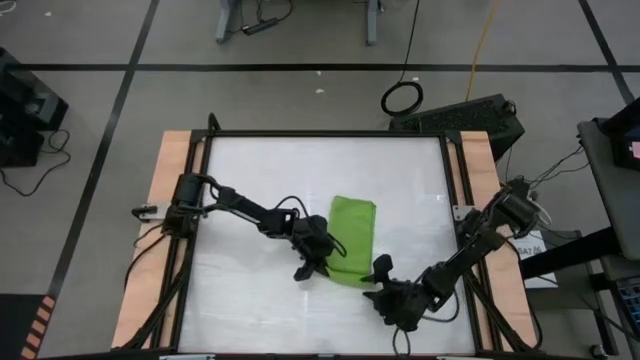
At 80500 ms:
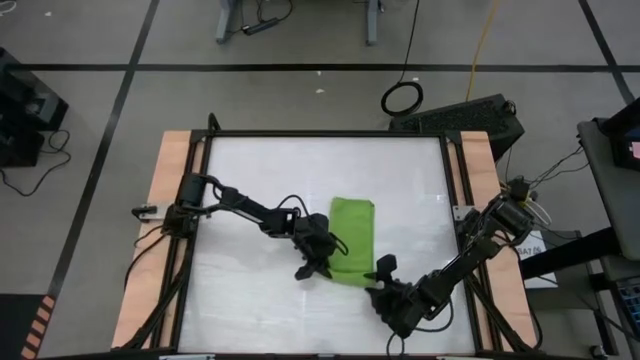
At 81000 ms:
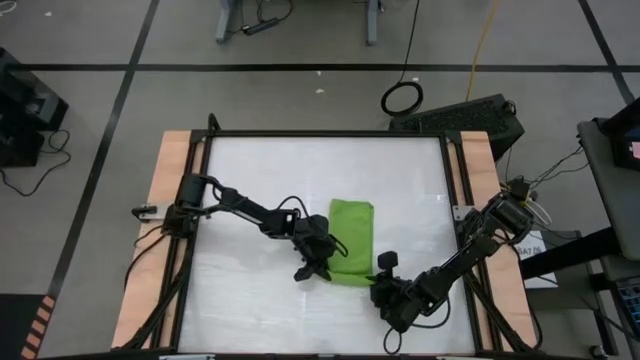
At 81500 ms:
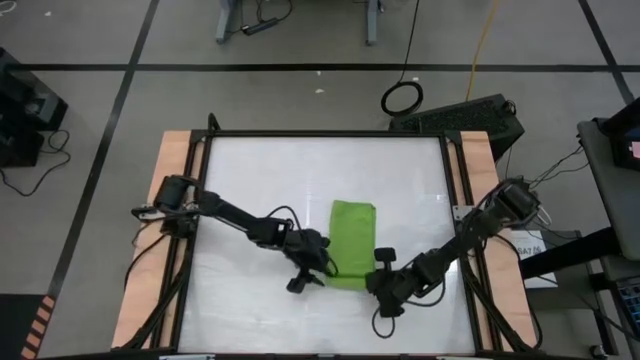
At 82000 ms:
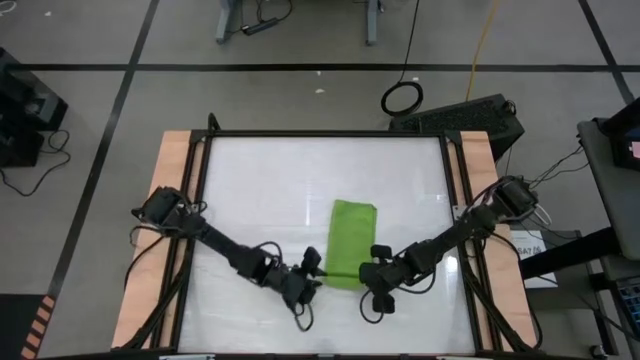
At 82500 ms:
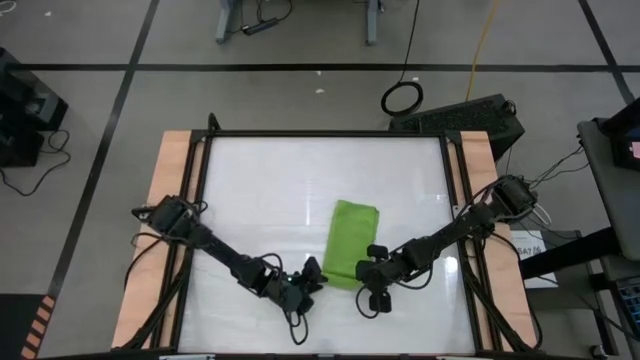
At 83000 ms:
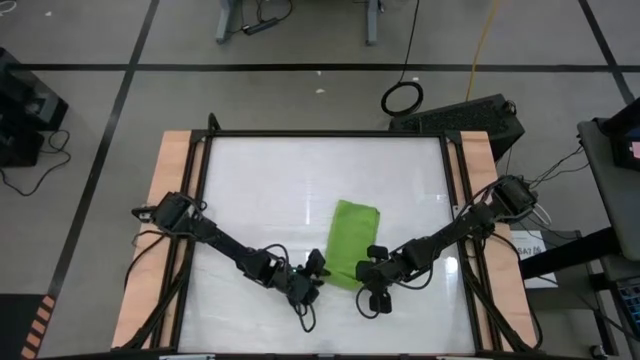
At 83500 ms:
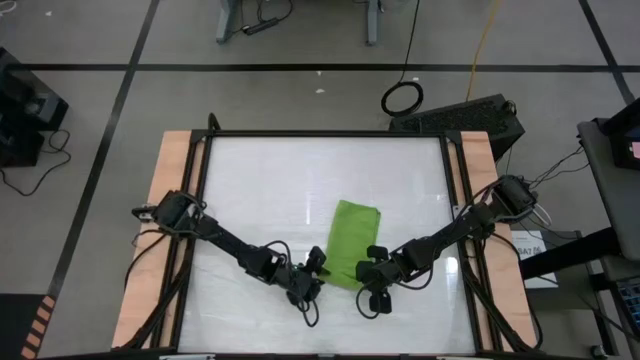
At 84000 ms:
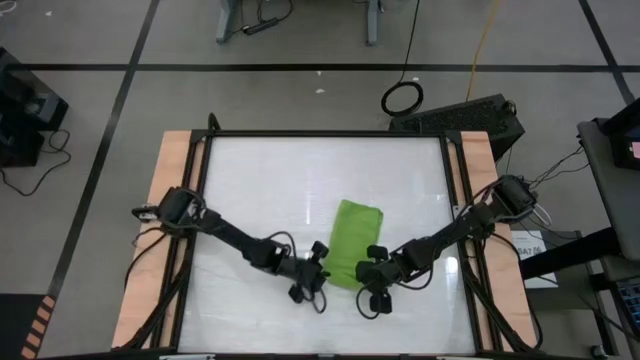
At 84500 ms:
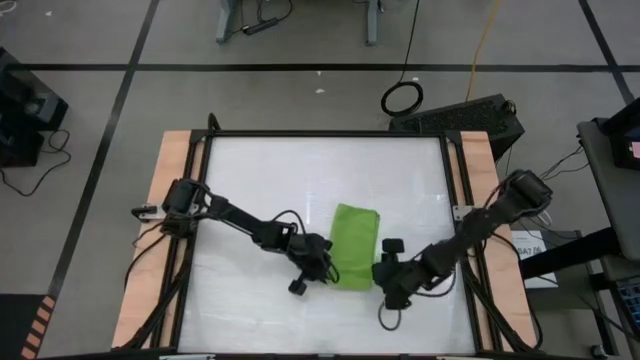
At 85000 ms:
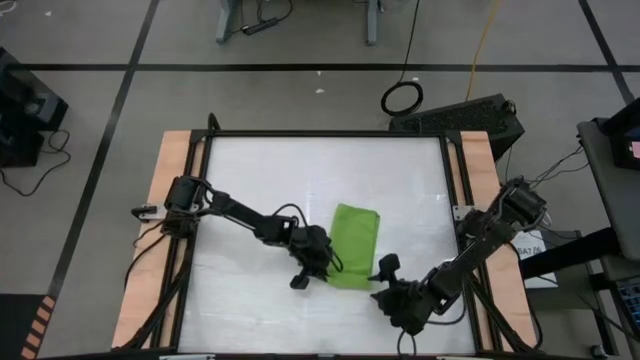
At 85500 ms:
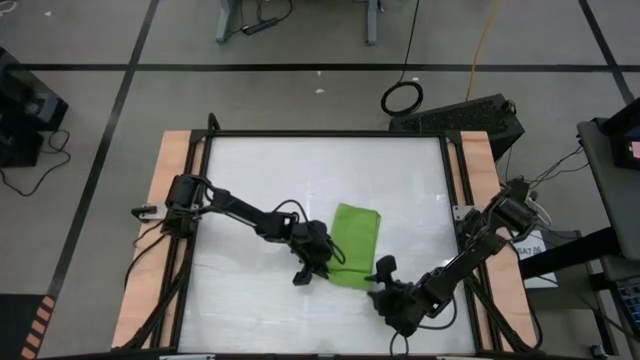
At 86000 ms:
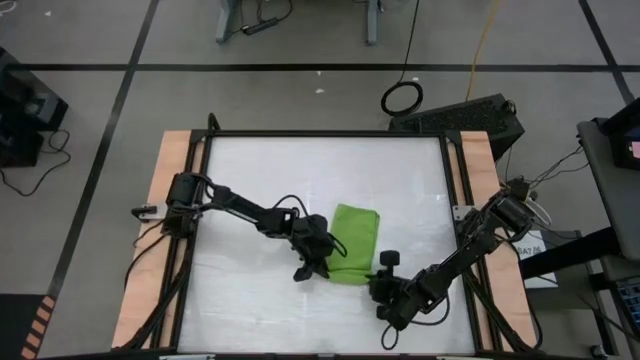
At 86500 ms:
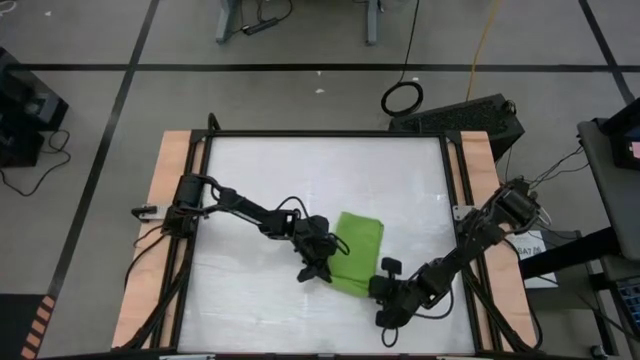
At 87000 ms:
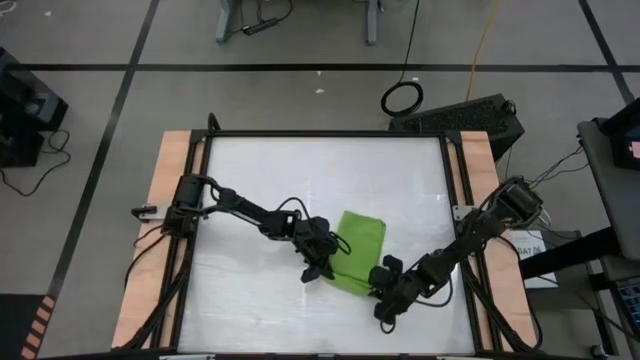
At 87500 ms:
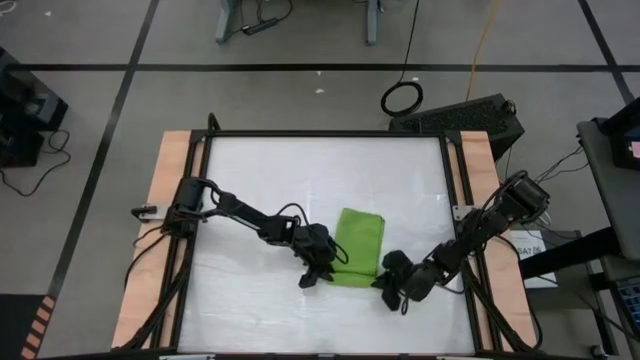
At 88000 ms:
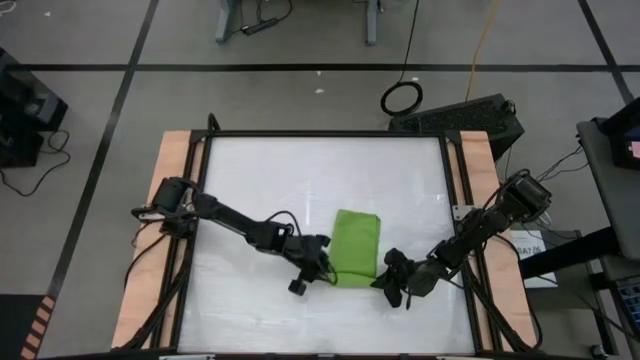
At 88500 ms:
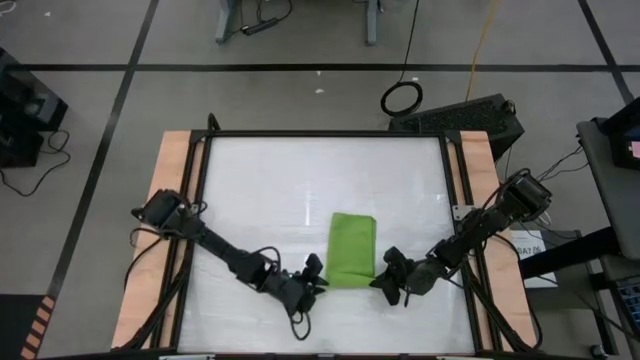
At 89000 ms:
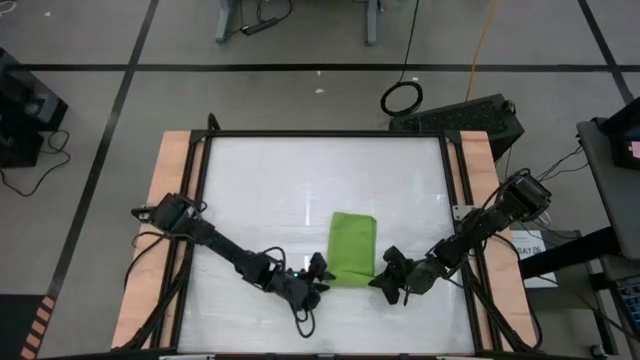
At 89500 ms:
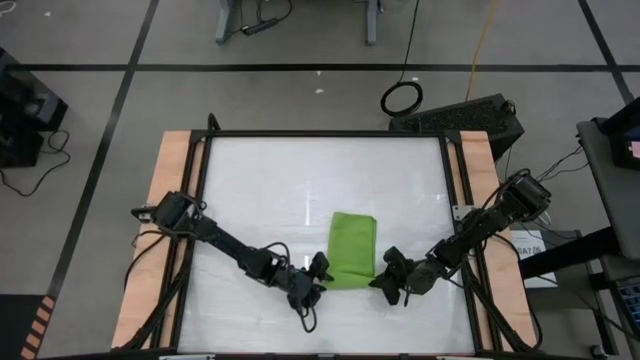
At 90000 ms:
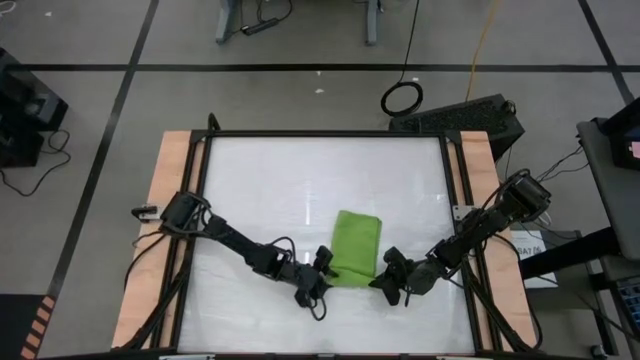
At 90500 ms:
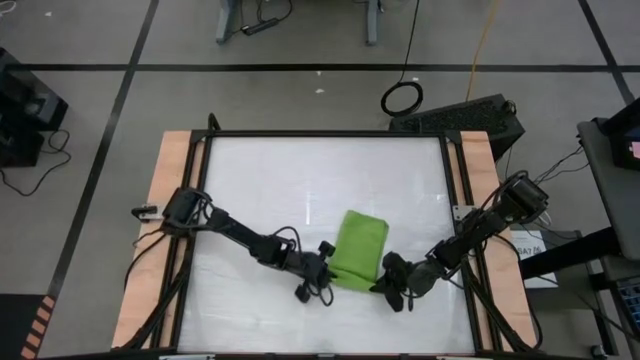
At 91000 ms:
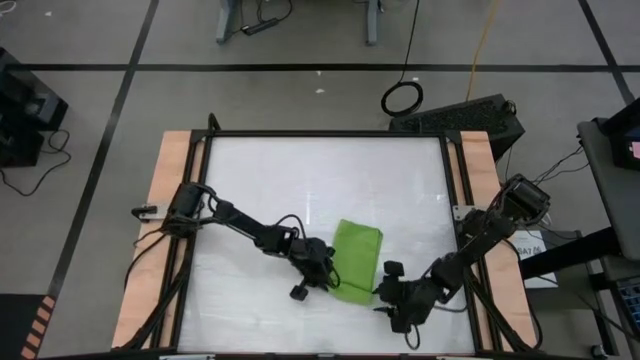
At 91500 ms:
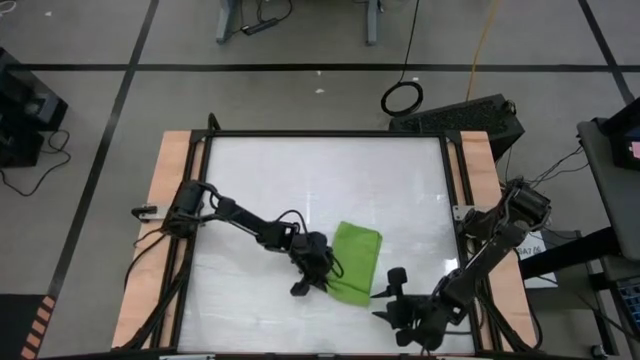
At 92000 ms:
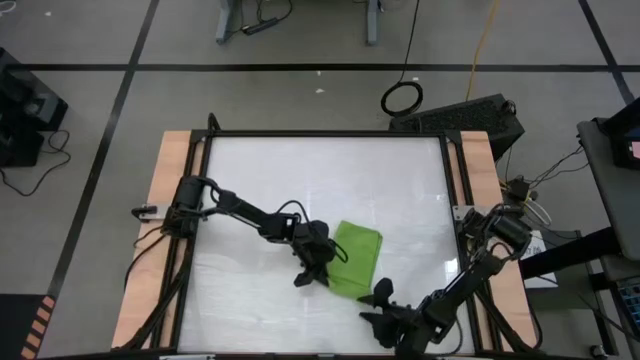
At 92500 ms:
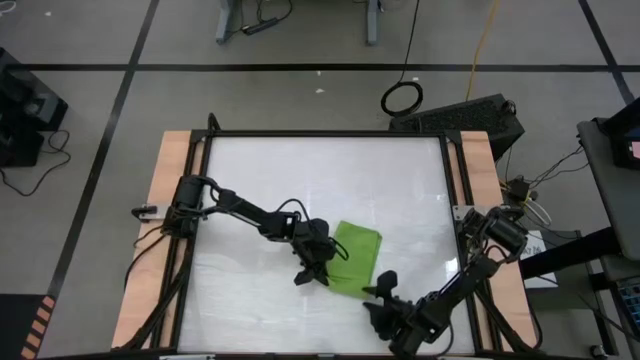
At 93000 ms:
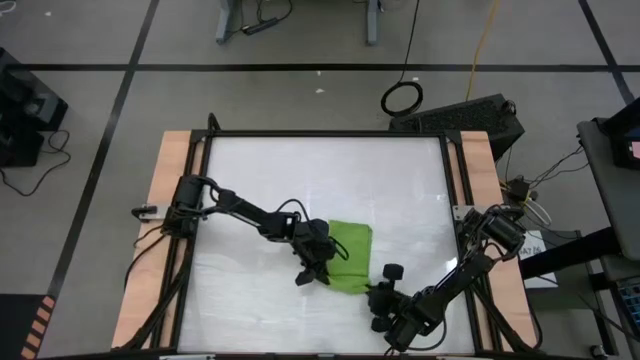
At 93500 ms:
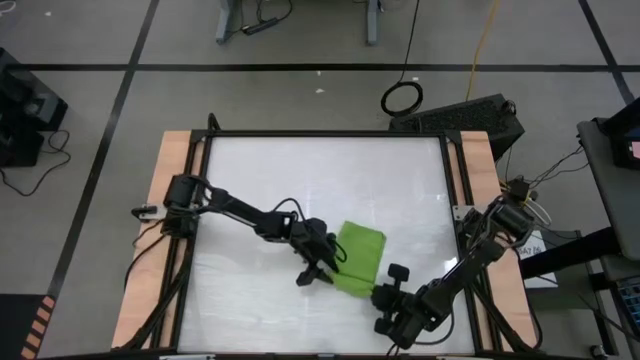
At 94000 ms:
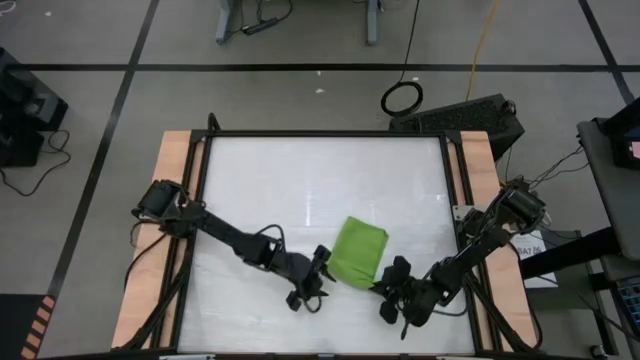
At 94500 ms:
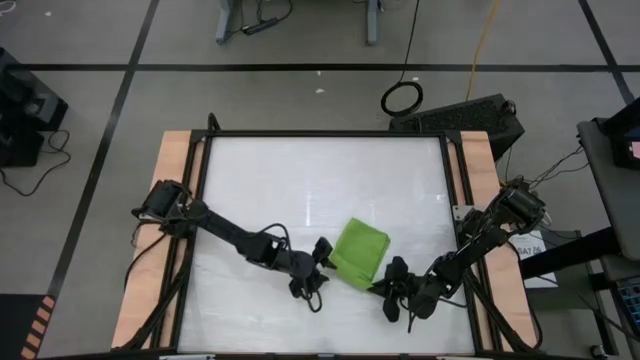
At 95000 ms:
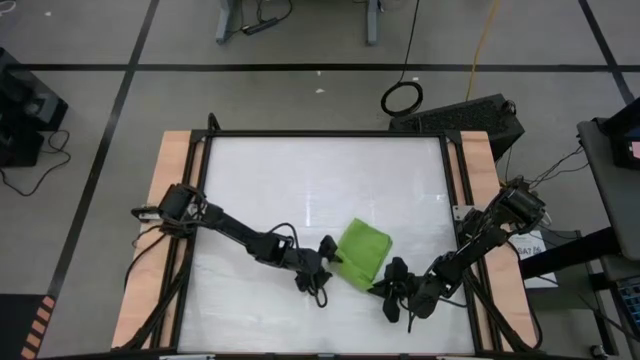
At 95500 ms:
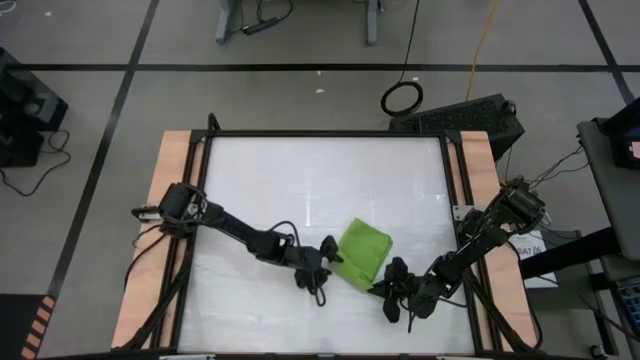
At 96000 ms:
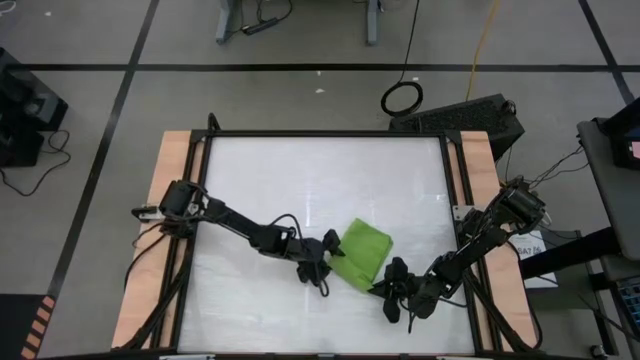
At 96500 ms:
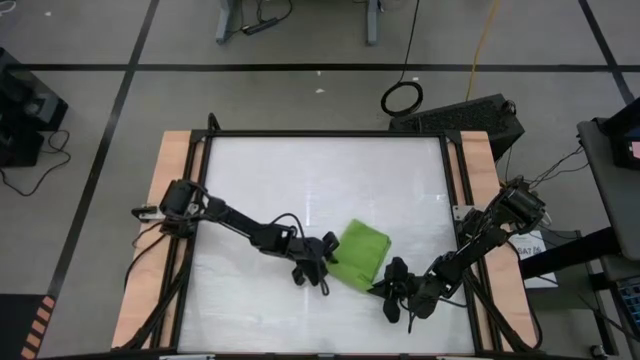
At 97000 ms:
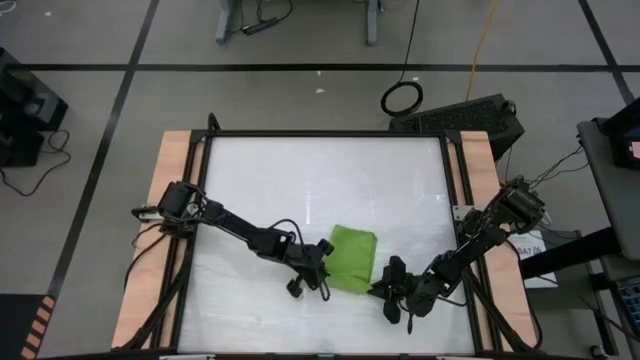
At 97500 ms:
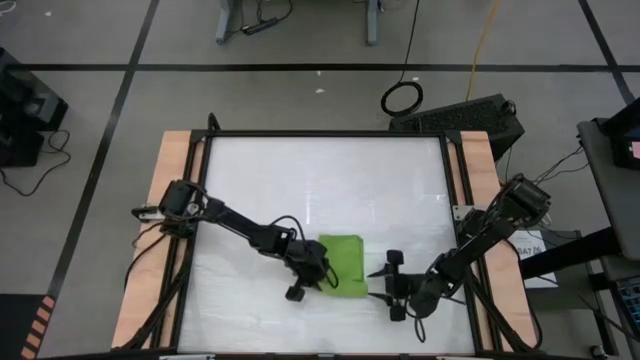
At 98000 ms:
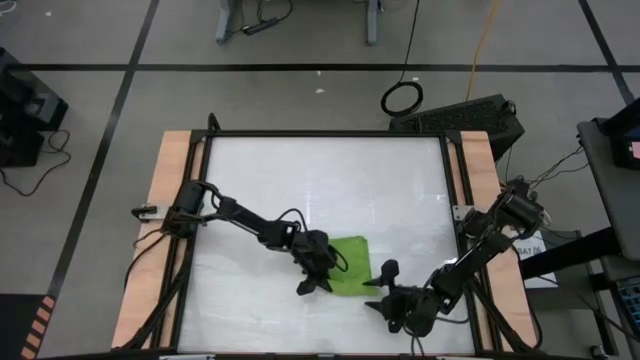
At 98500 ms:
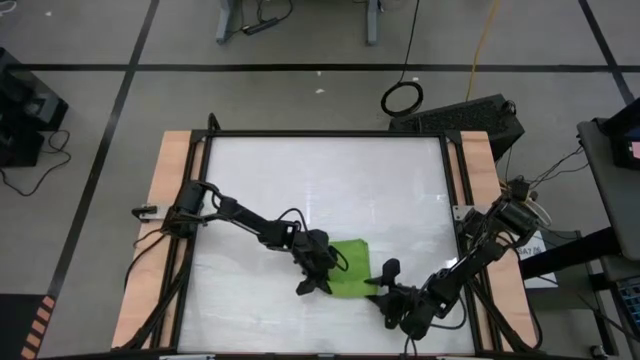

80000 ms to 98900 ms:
Task: Roll towel
Roll the green towel on the table
